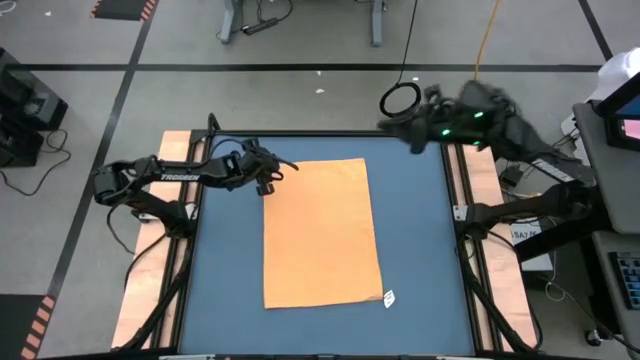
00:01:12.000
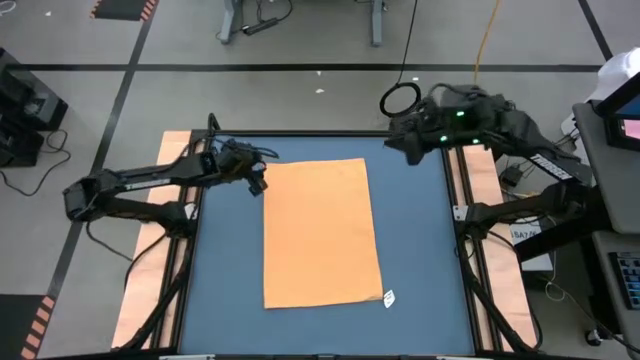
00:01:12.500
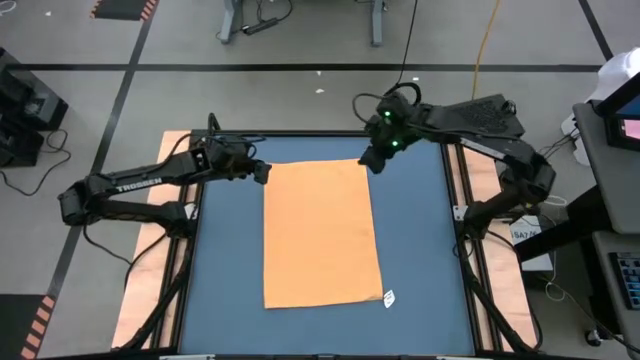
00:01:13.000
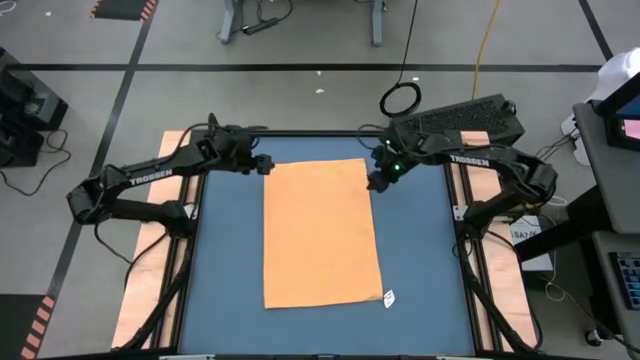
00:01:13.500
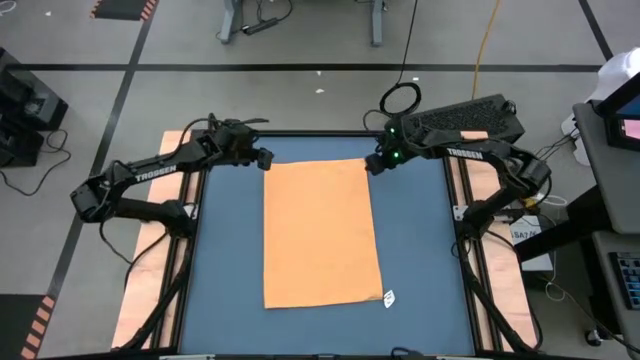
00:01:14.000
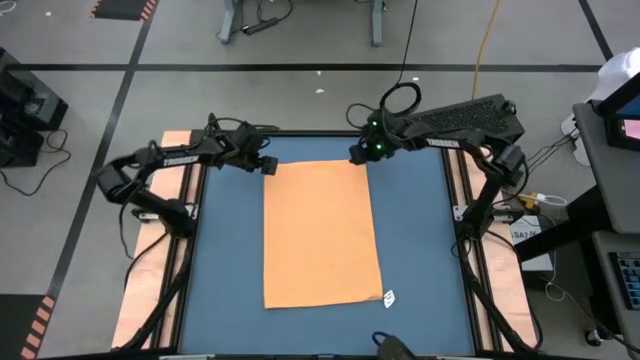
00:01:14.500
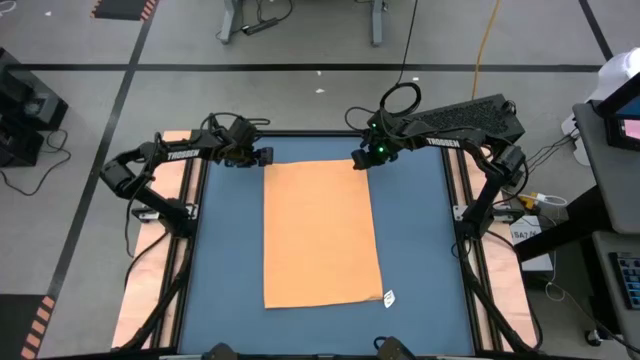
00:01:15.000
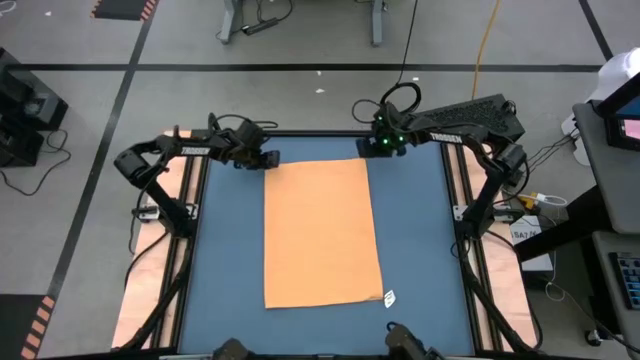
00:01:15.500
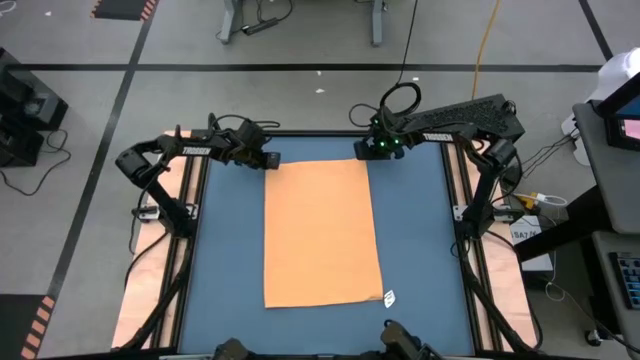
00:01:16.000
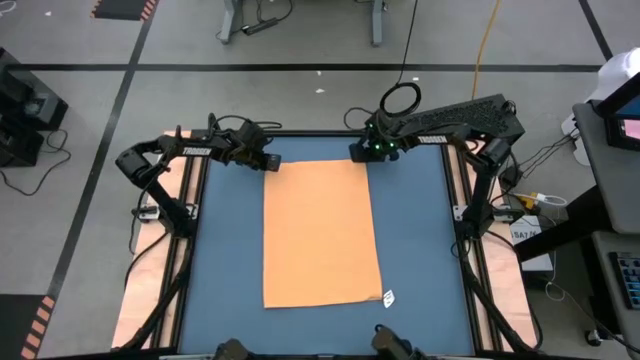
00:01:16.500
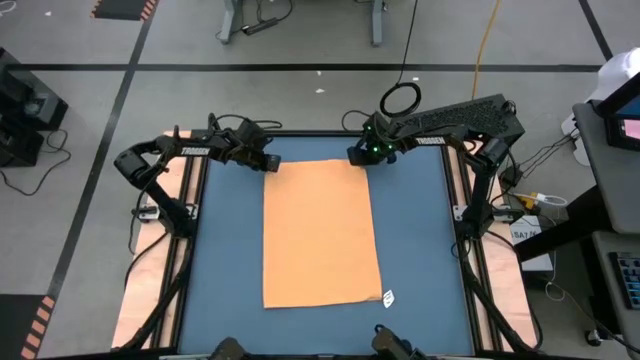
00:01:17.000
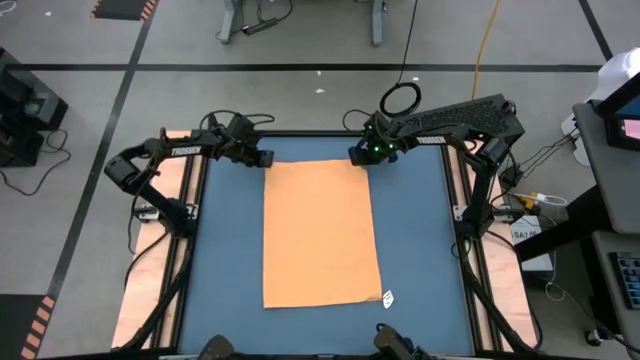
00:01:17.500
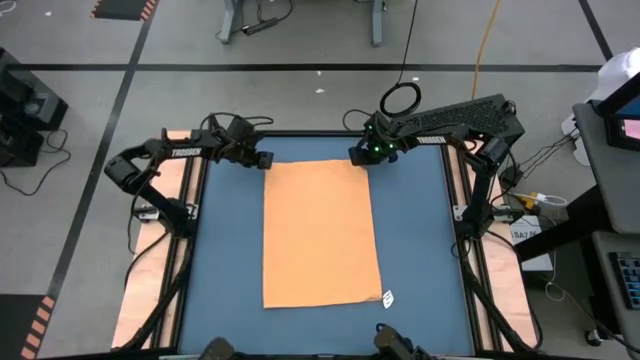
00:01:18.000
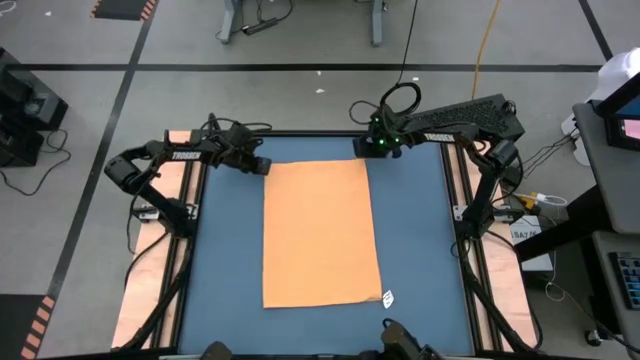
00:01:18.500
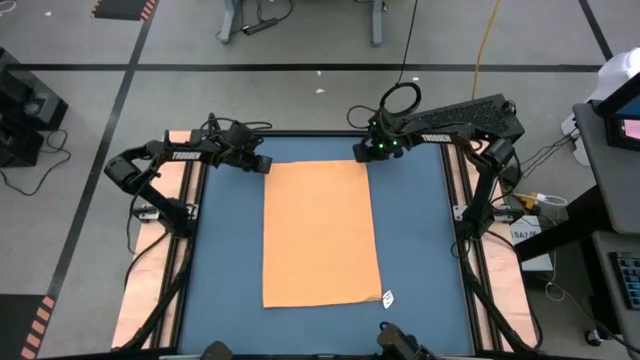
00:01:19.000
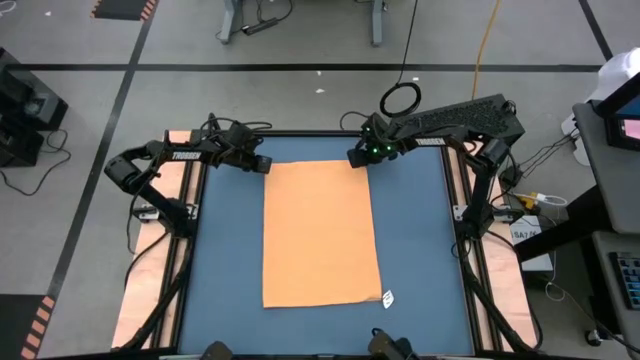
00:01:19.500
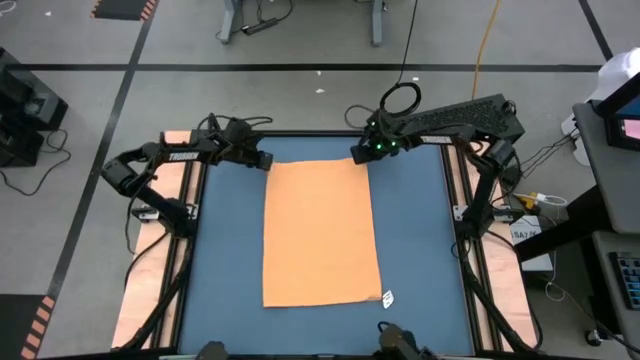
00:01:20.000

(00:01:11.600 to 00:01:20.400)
Task: Roll towel
Roll the yellow towel

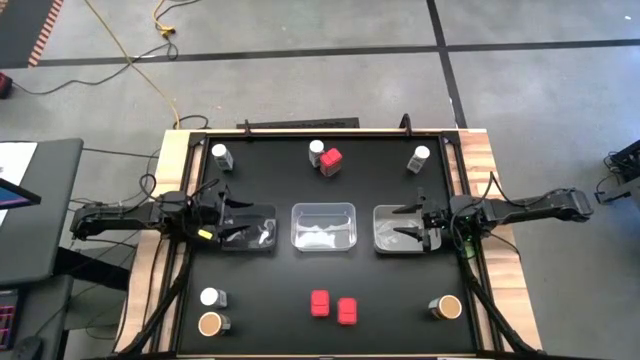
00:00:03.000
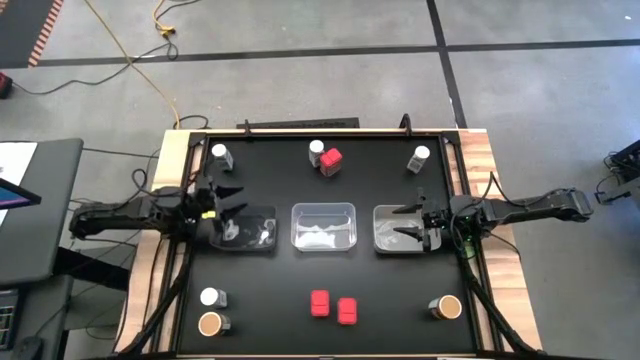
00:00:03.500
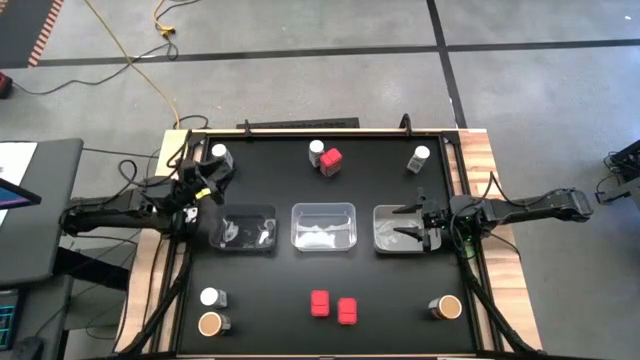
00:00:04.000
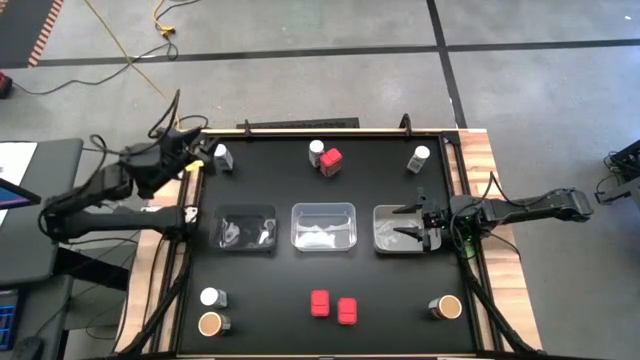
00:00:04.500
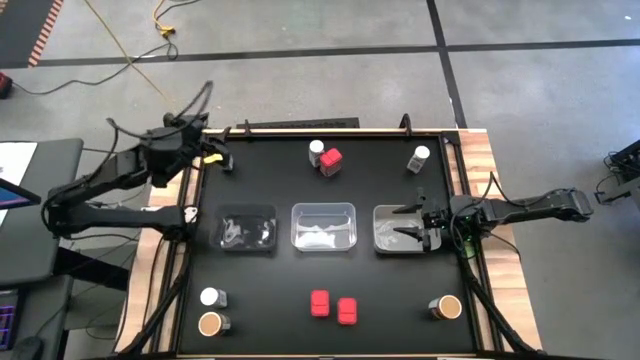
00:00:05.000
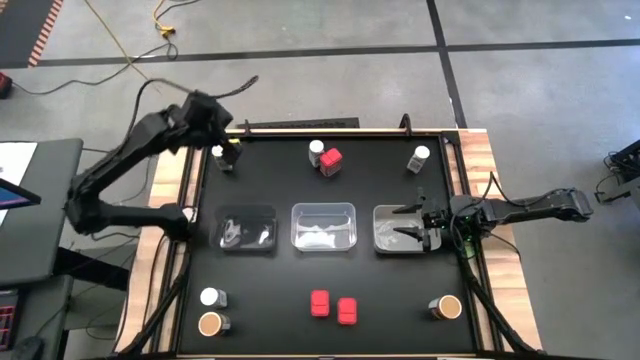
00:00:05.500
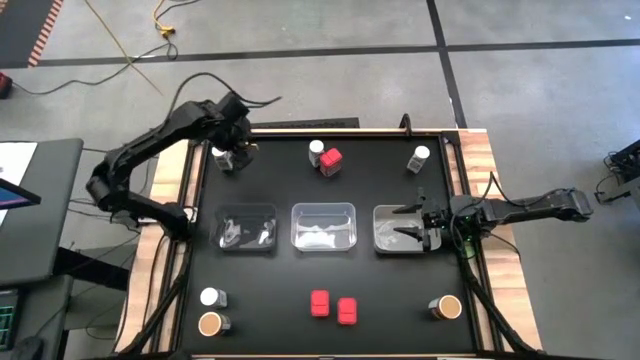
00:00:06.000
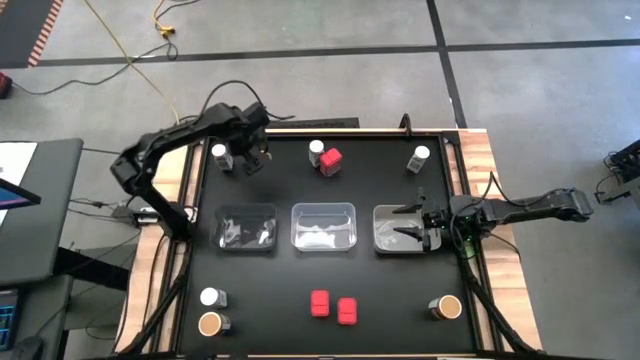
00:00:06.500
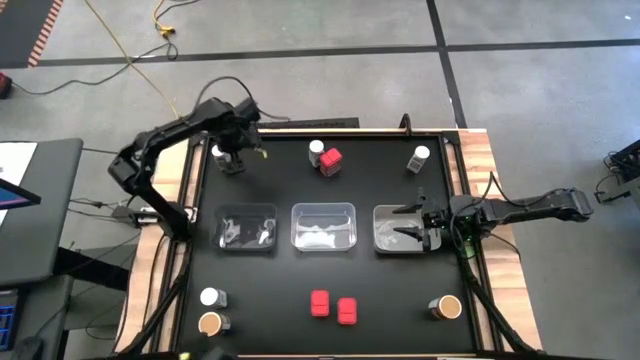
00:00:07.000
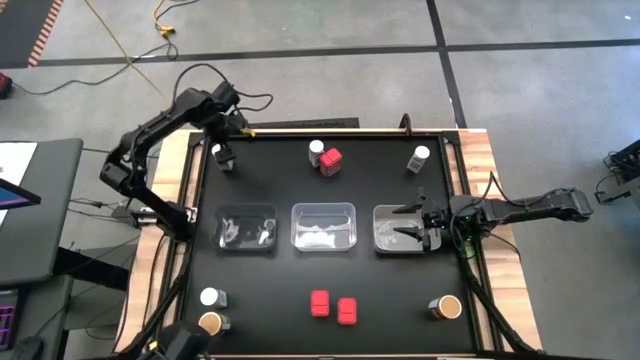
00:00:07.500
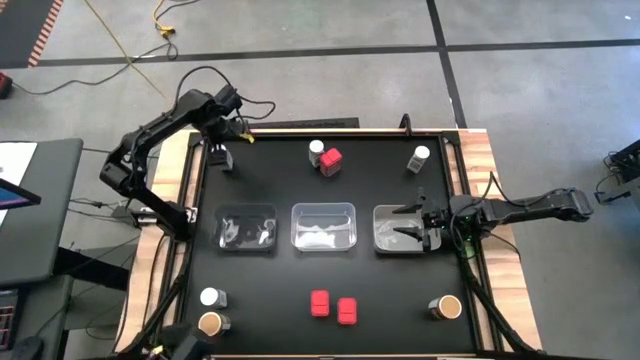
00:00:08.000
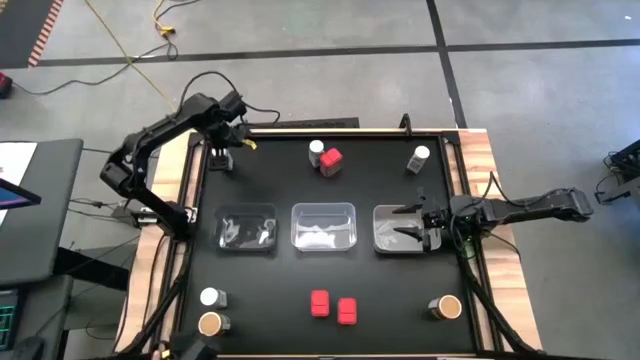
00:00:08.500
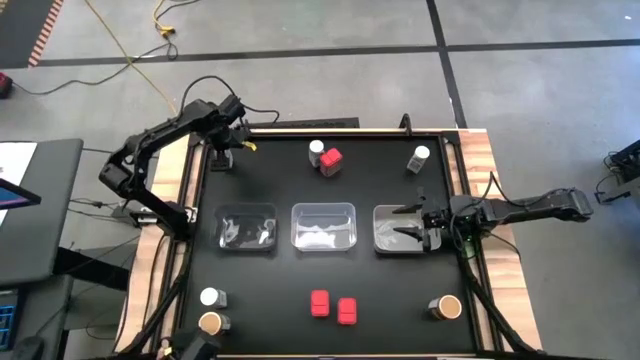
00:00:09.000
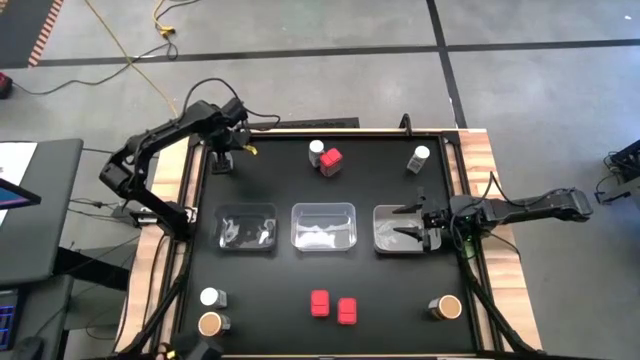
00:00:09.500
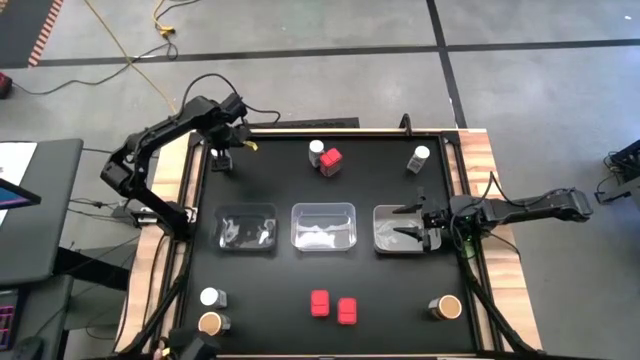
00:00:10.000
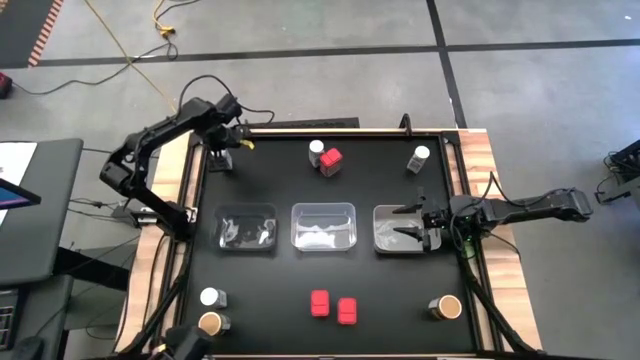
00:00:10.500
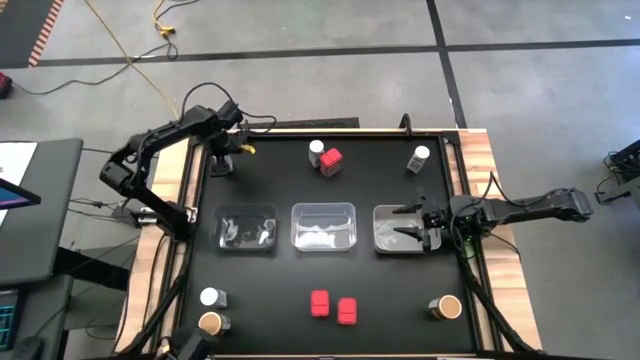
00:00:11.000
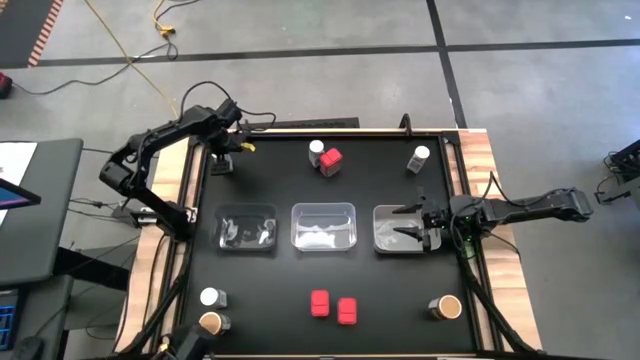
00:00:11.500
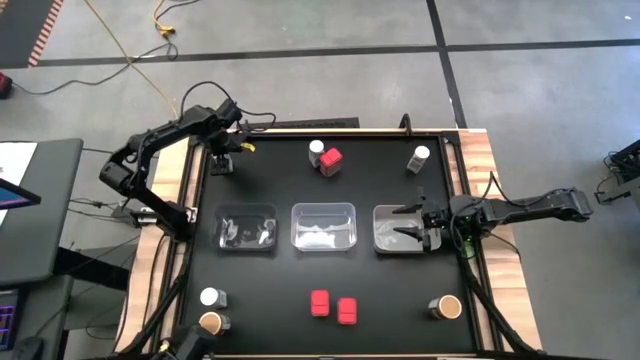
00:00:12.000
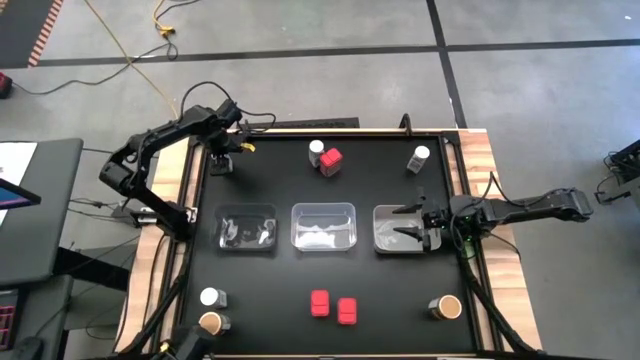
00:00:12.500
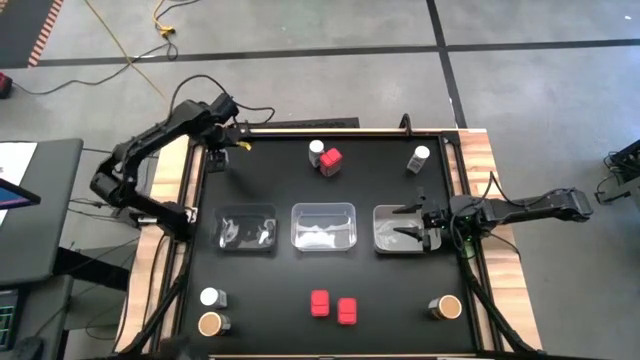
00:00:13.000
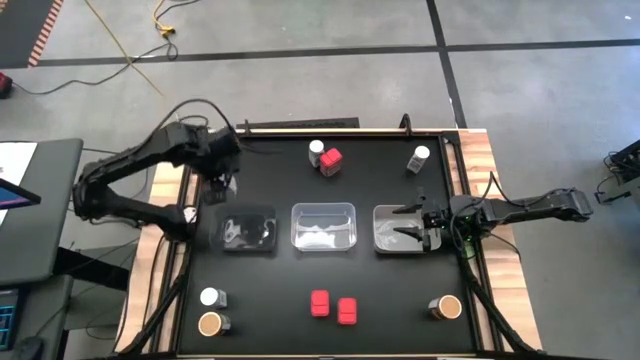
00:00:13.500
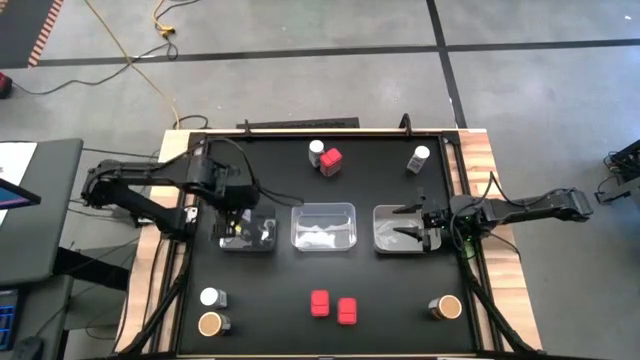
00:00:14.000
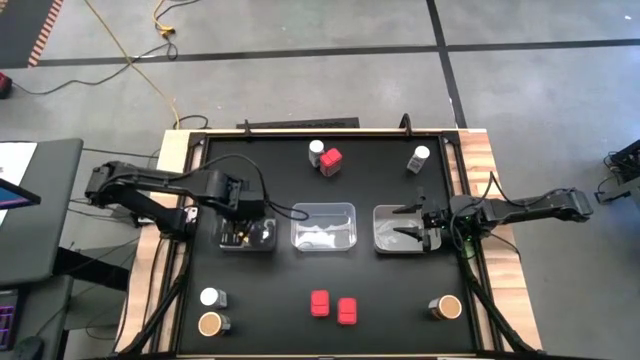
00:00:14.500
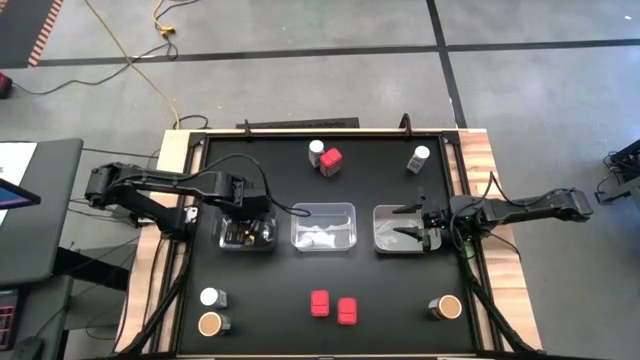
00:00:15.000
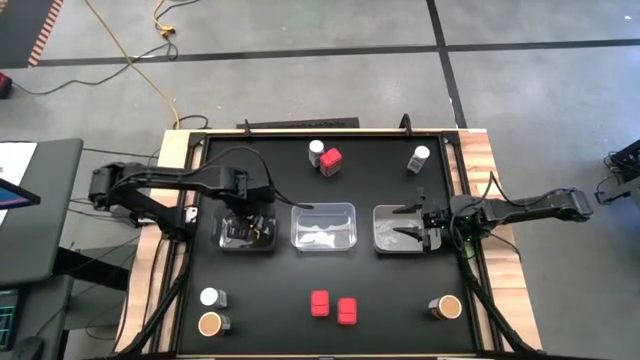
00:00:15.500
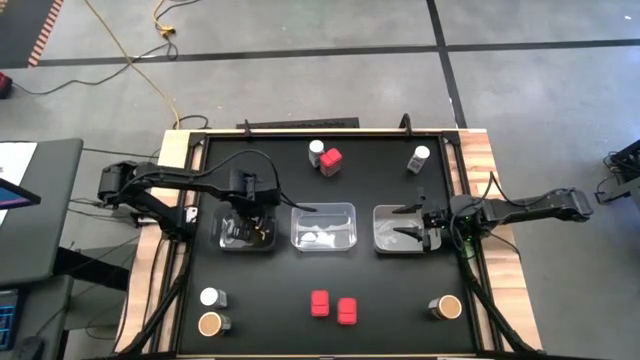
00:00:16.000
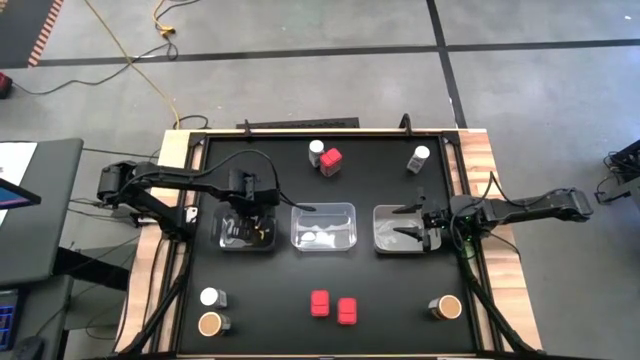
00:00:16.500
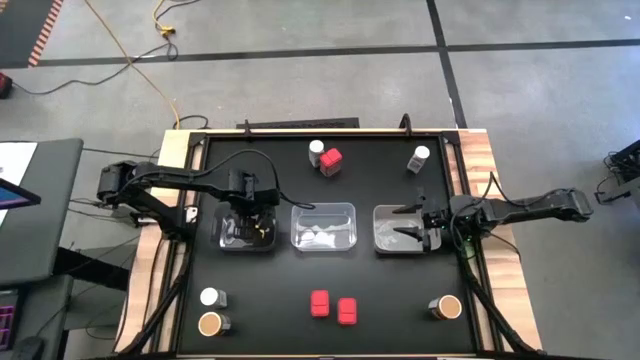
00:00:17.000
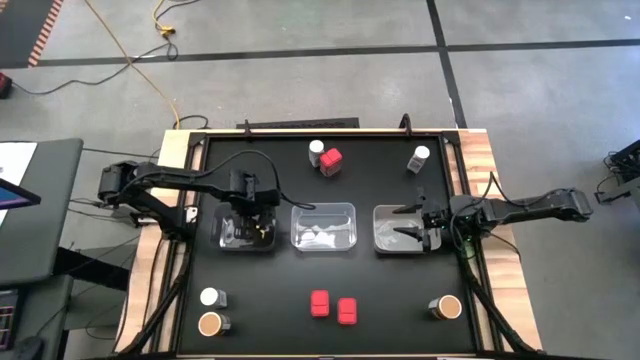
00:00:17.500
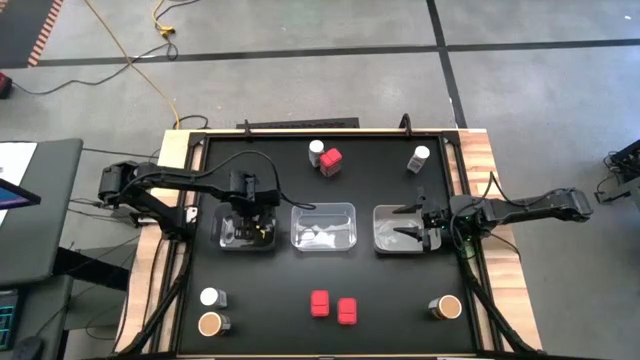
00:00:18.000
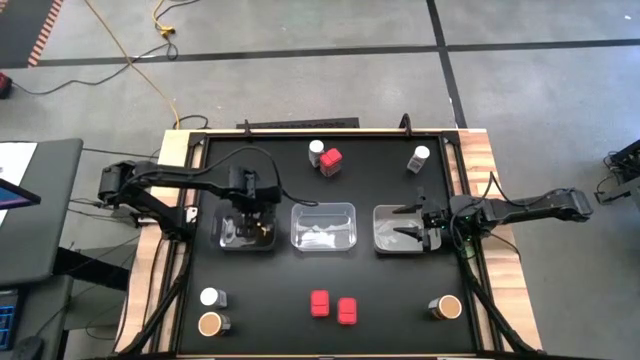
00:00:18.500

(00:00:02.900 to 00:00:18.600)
Task: Sort spices by type
Put the top left white seasoning bottle into the black bin
